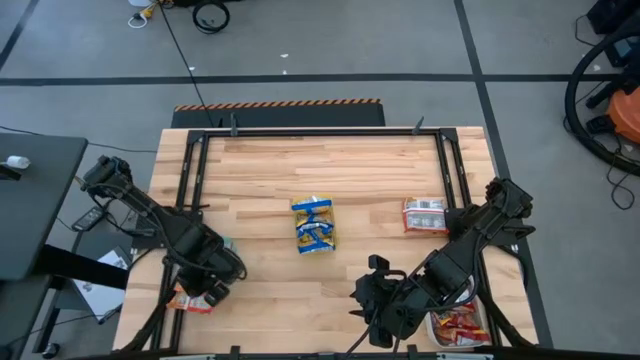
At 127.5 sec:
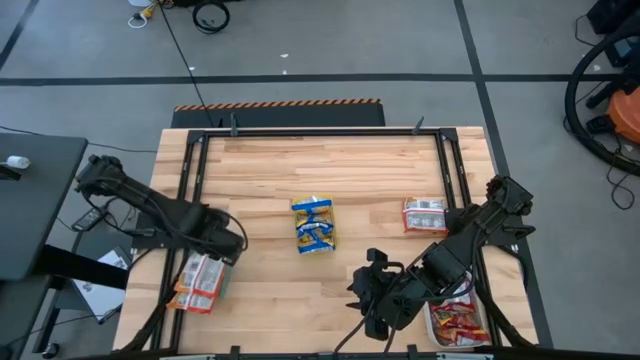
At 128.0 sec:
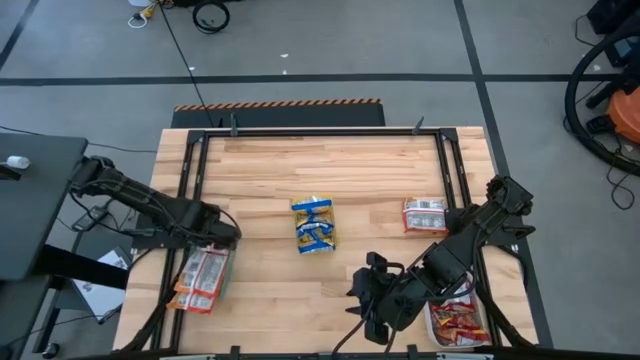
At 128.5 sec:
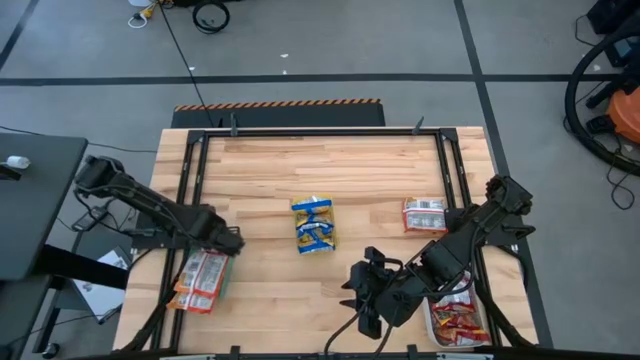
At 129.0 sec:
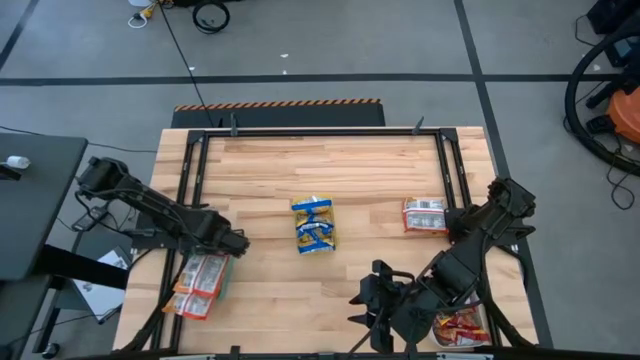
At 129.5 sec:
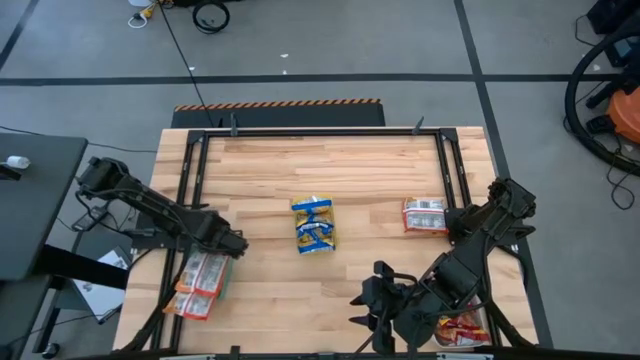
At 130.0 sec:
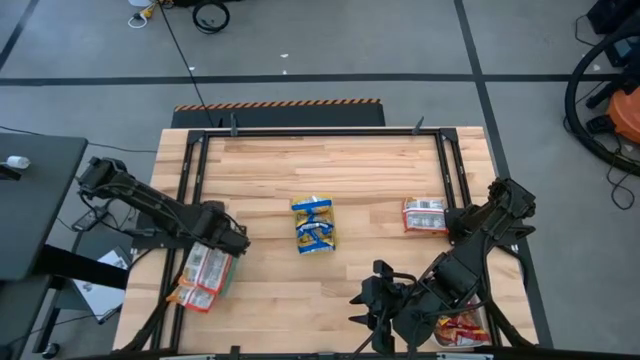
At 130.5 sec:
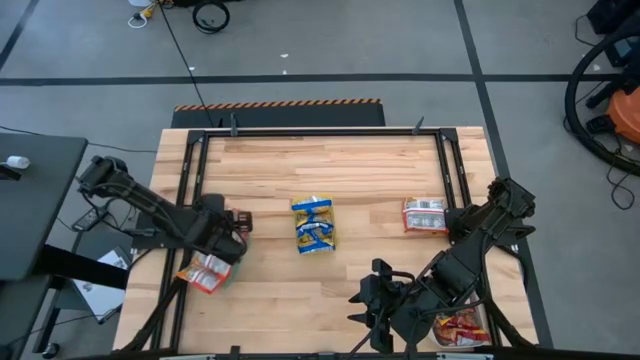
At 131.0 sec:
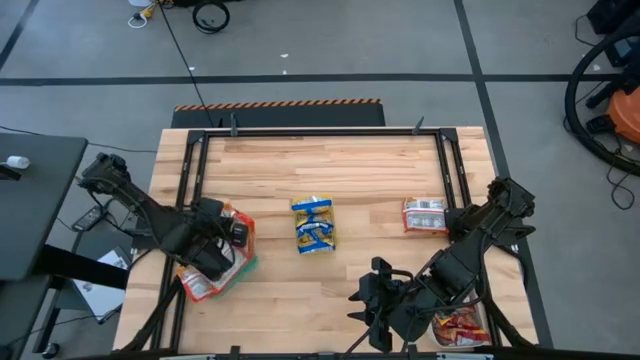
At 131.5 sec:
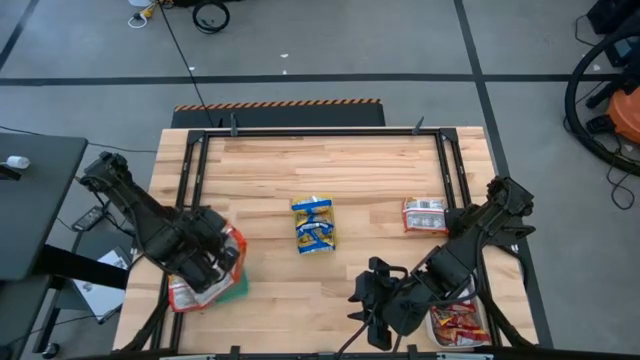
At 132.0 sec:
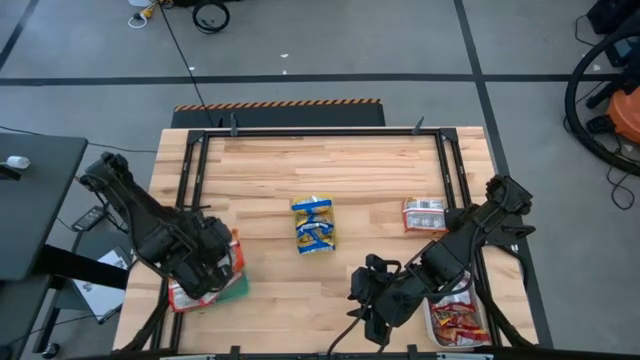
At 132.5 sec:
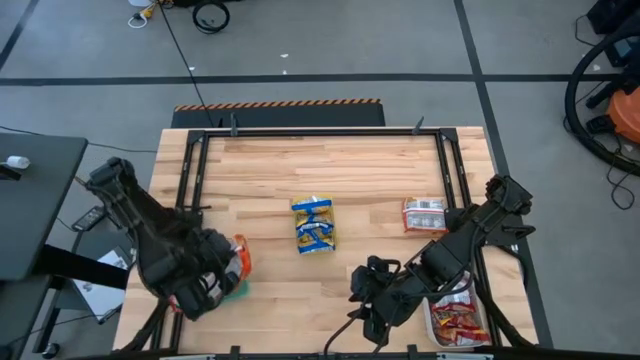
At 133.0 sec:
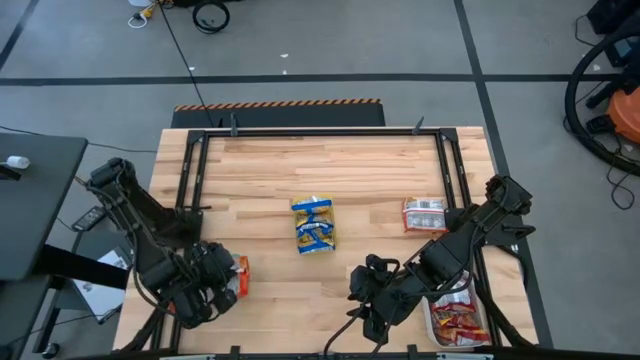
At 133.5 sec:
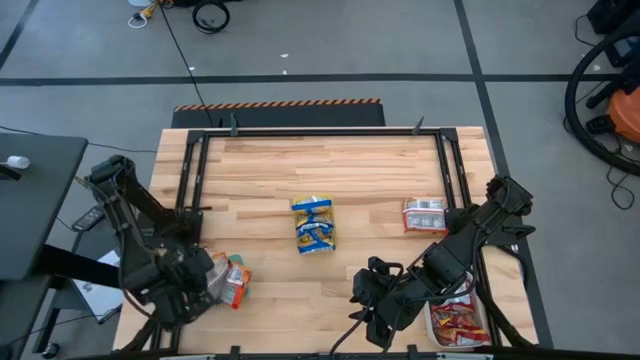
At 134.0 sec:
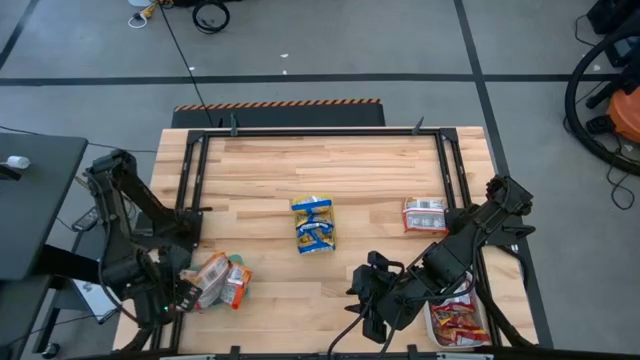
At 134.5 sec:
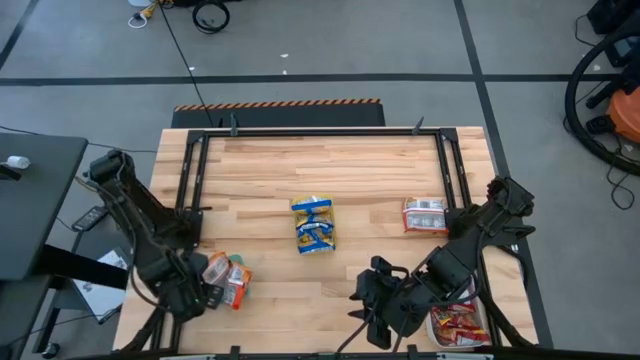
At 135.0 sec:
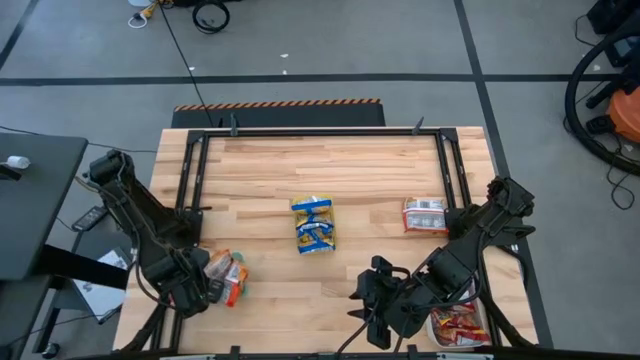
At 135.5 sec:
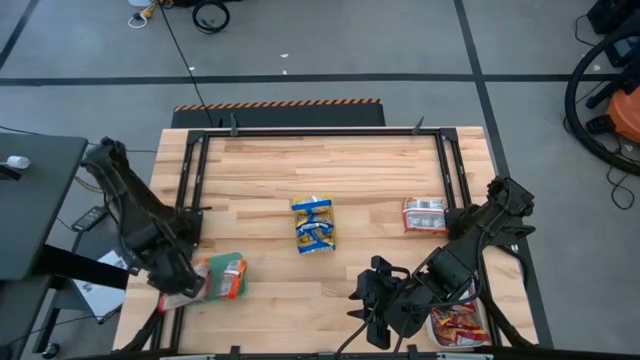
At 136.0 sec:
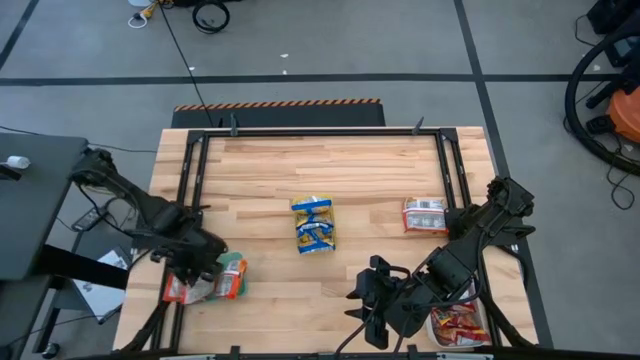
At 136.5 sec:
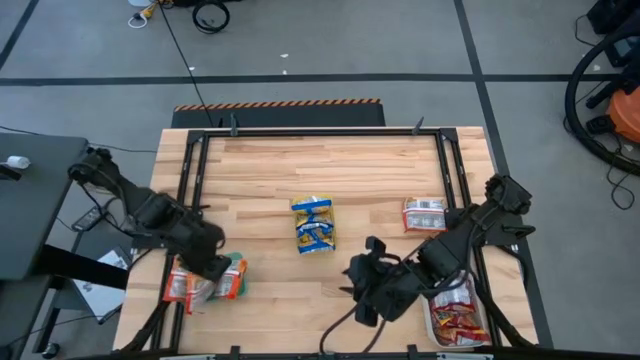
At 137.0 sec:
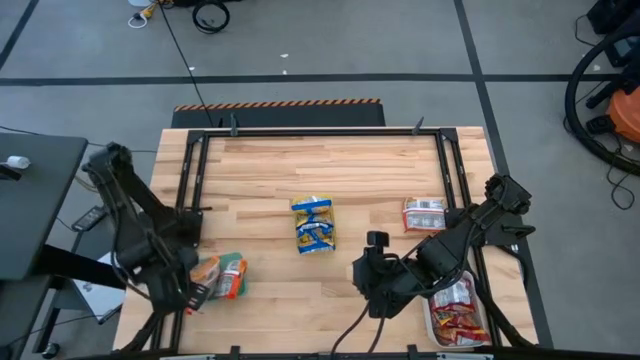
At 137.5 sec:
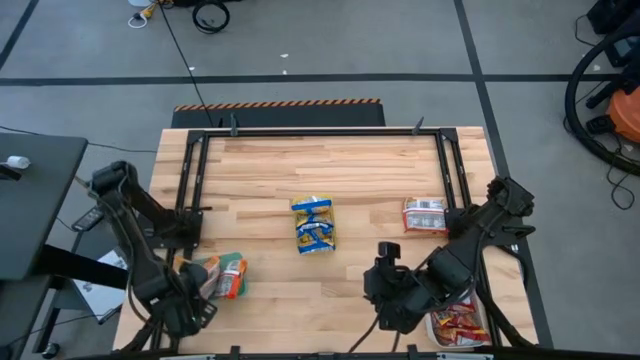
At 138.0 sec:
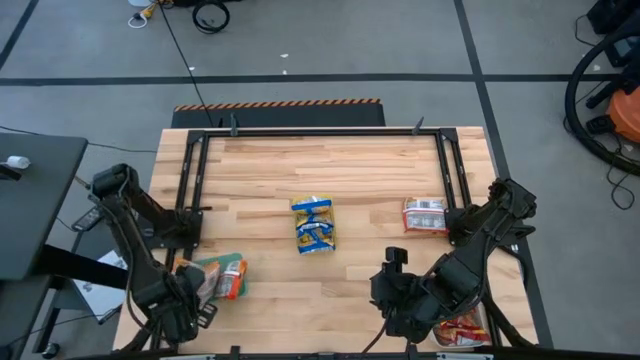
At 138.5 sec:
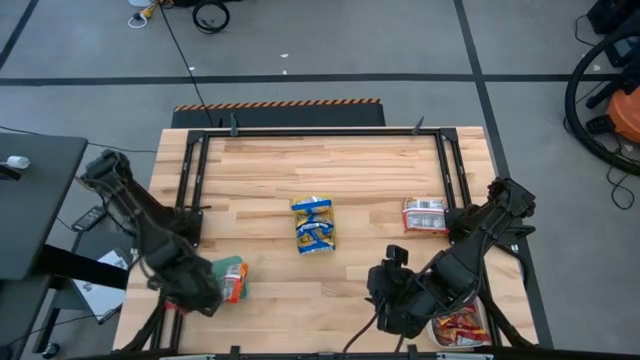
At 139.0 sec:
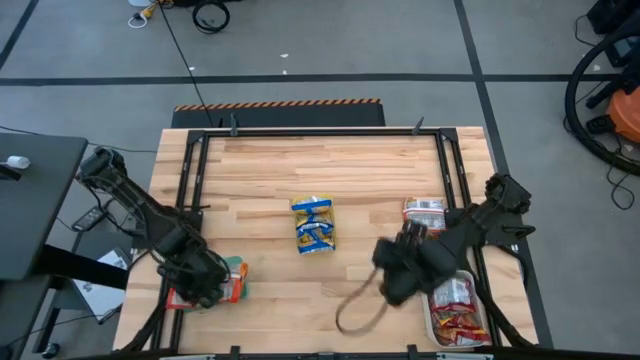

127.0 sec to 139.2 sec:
Task: Sort Maruchan noodles
Adjust the orange noodle packs in the green bin

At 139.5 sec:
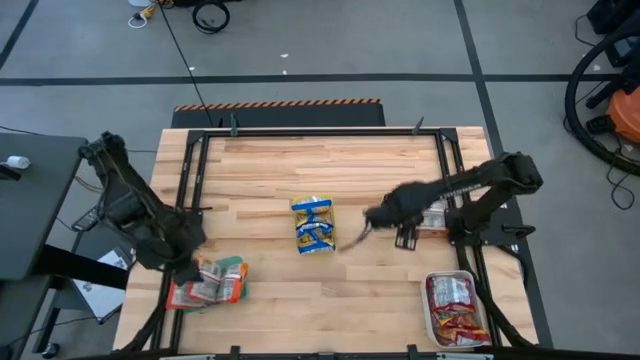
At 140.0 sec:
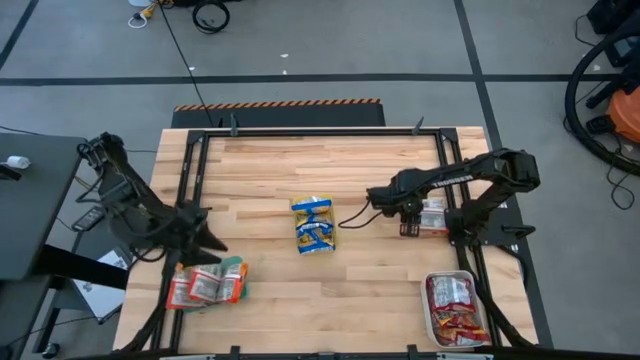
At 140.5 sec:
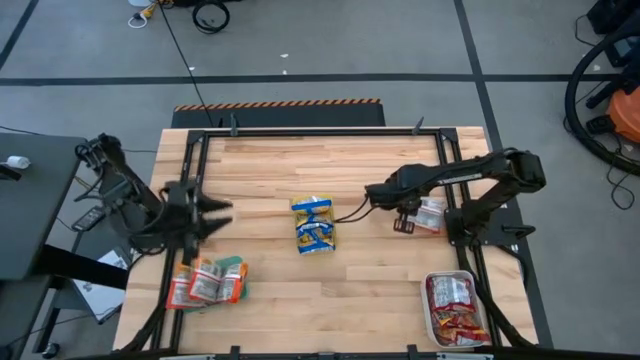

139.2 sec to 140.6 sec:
Put the orange noodle pack into the green bin

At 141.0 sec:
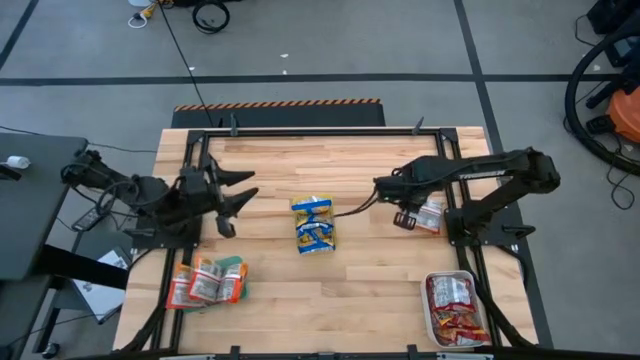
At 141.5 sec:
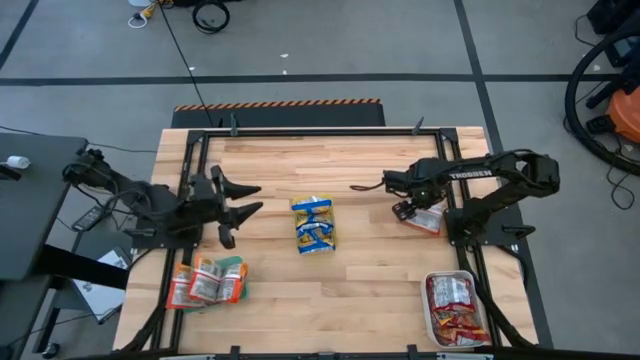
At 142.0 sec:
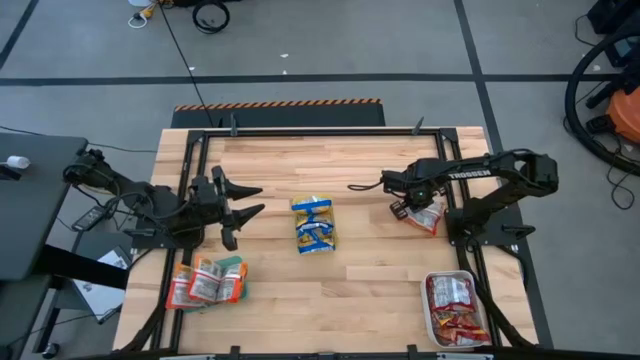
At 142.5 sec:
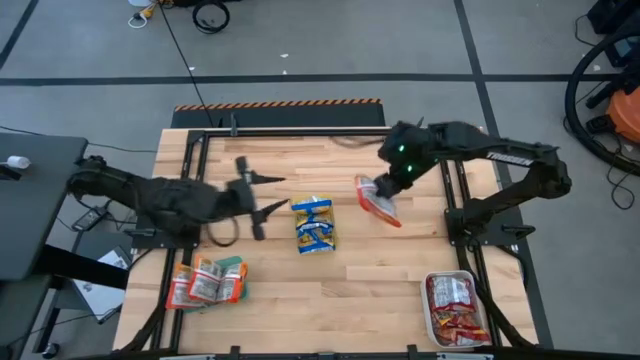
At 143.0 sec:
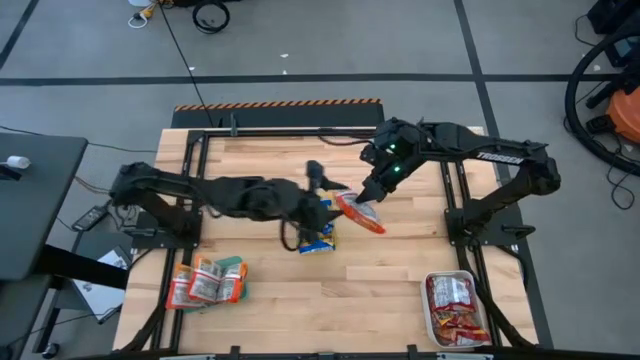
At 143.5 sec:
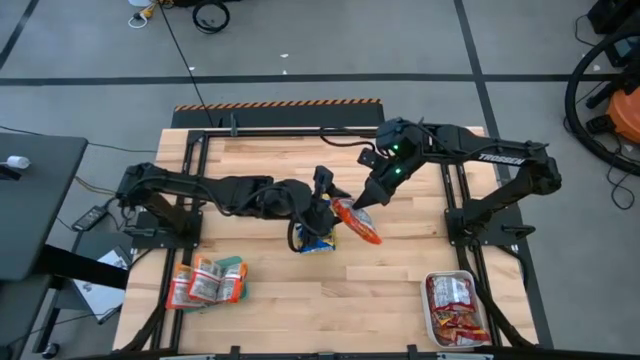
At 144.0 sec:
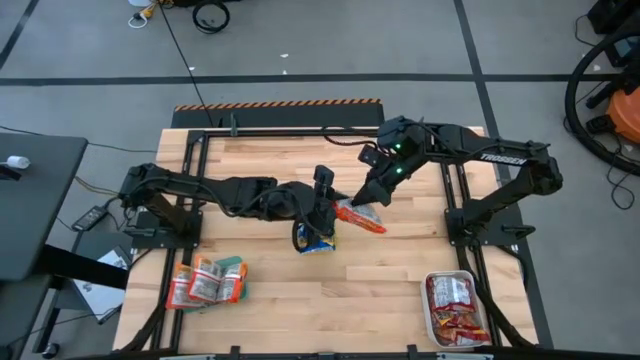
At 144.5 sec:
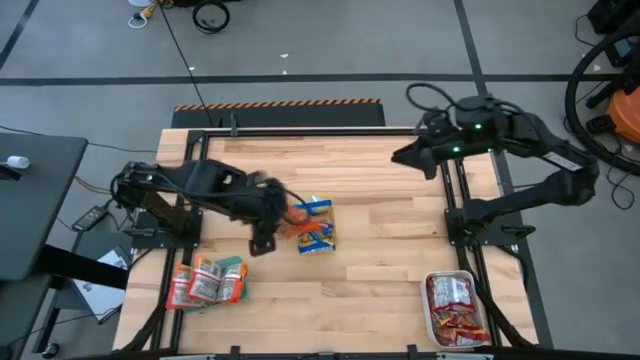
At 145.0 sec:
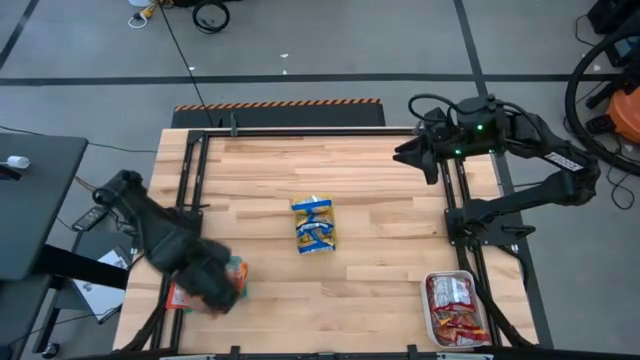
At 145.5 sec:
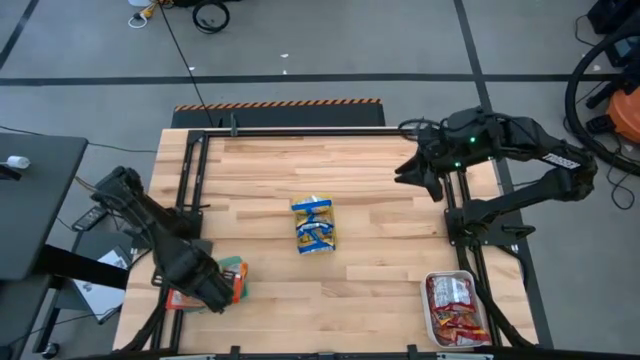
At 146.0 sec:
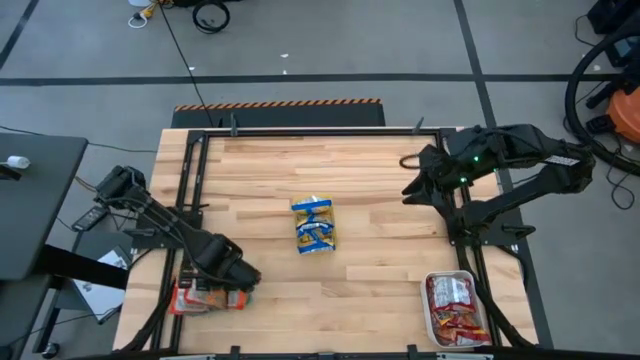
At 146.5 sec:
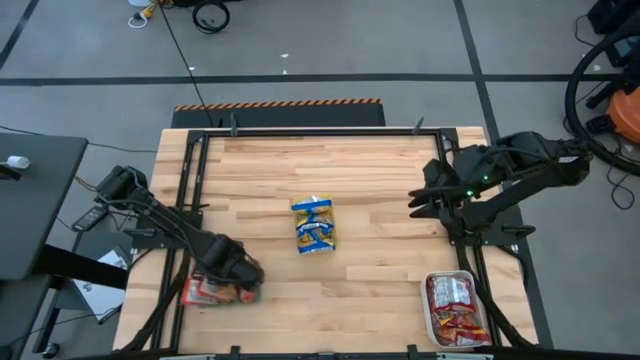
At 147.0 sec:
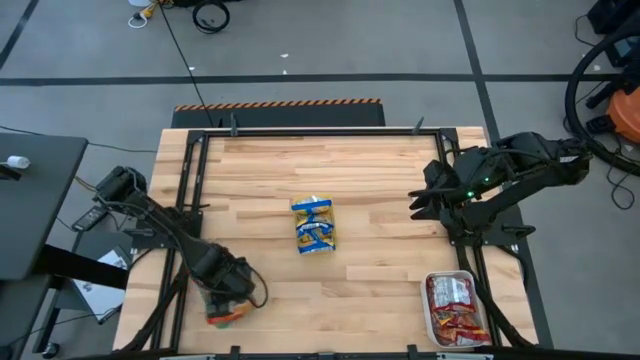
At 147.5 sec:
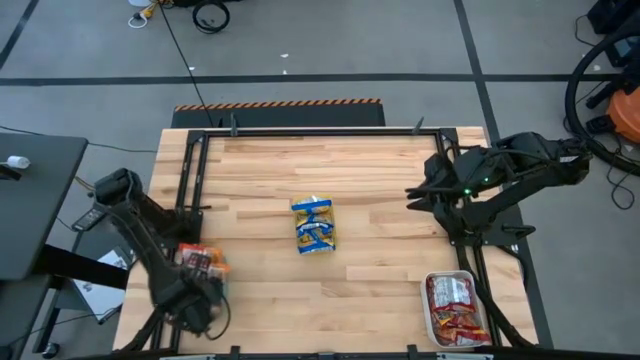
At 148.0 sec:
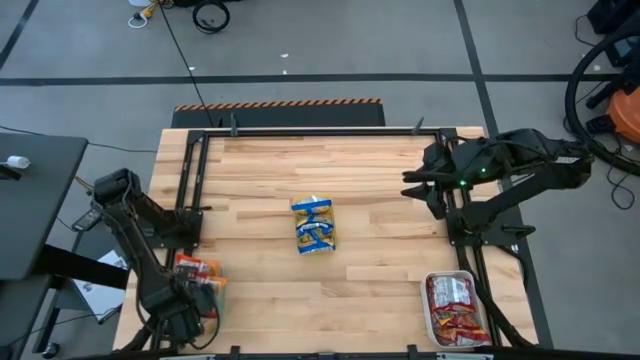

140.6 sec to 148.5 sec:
Put the orange noodle pack into the green bin
